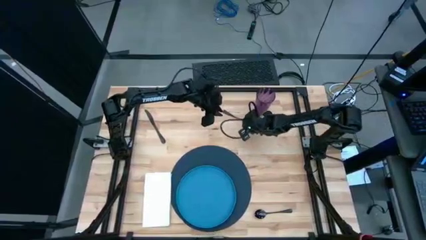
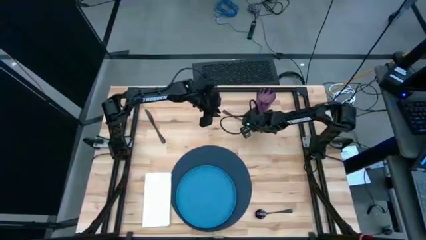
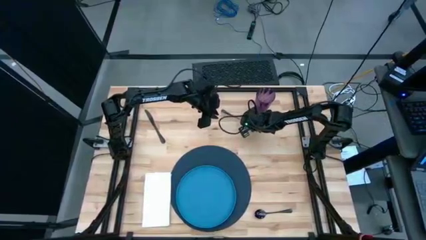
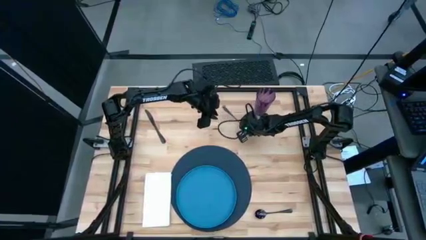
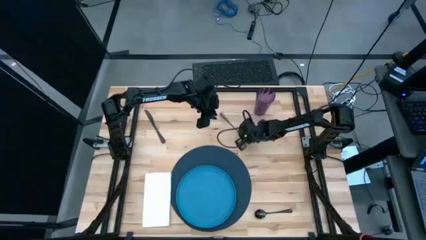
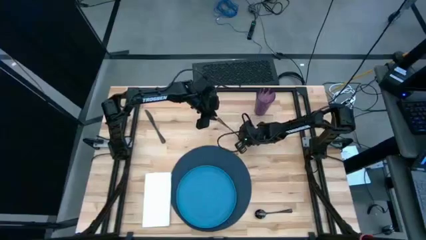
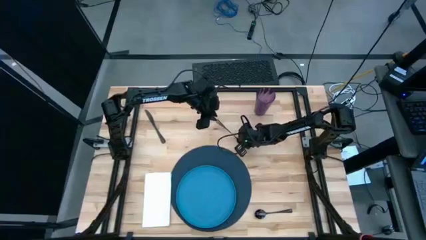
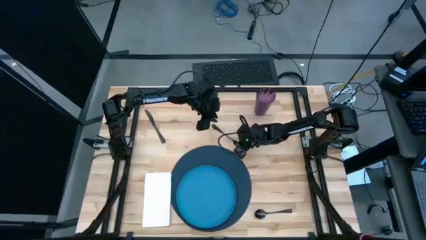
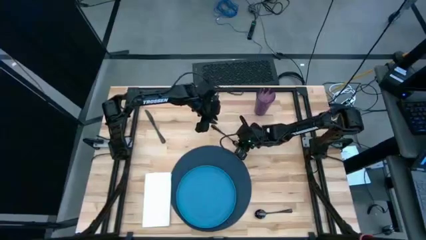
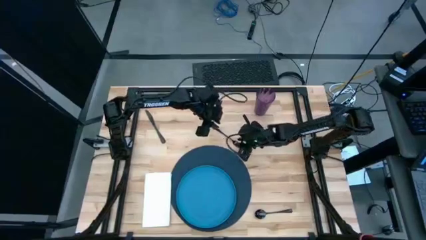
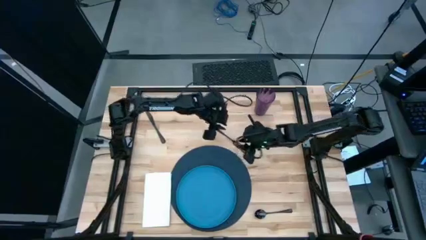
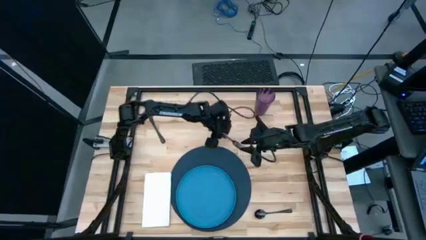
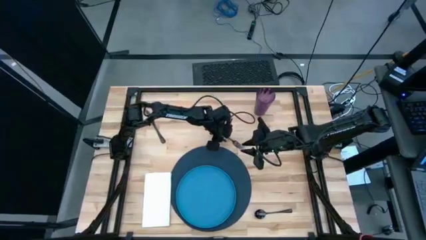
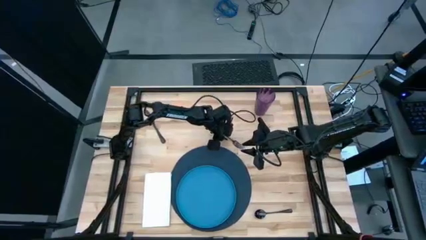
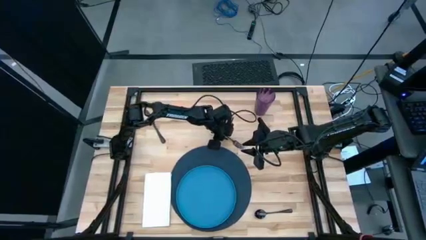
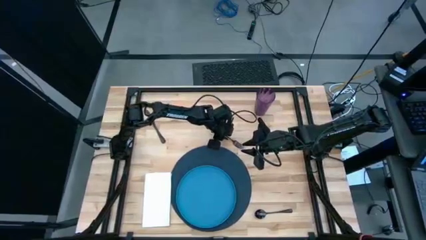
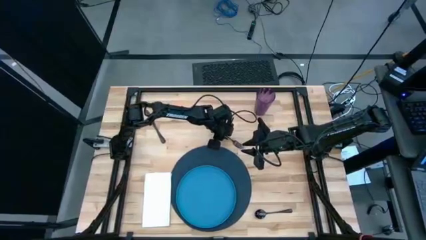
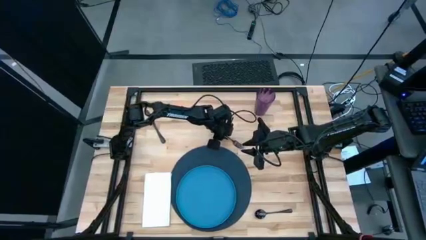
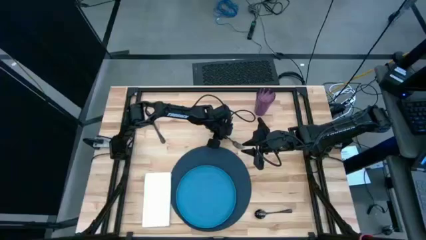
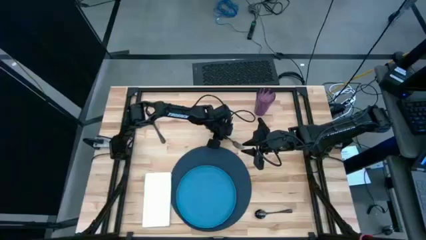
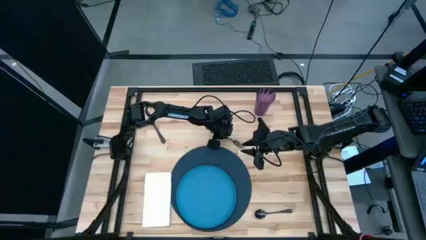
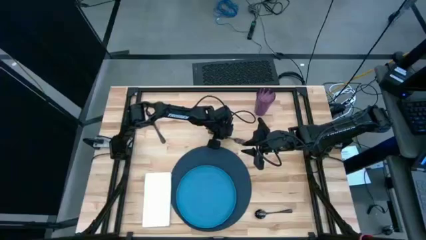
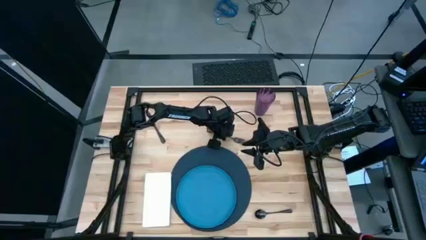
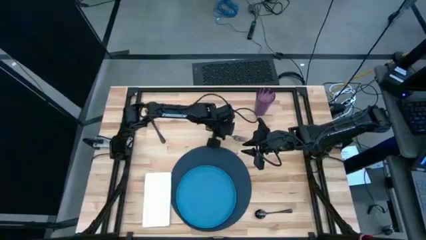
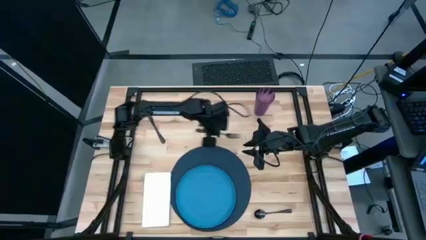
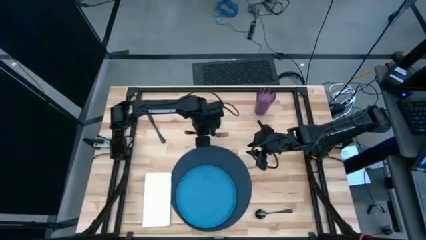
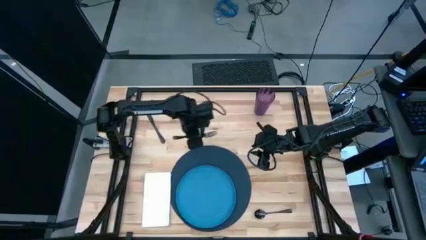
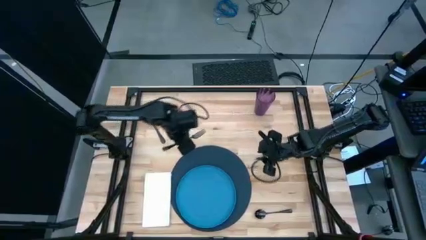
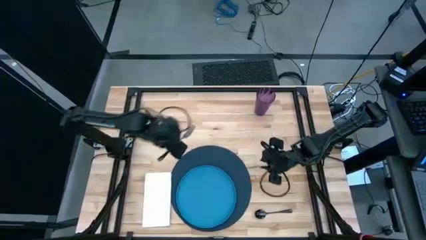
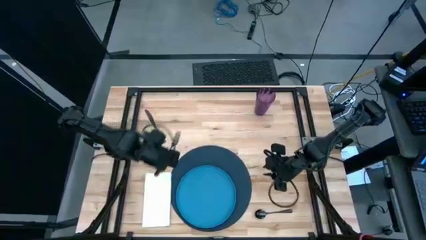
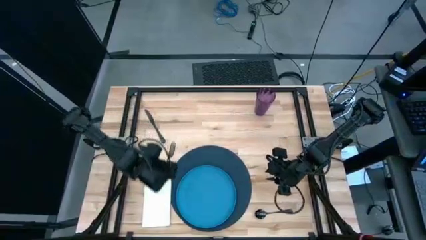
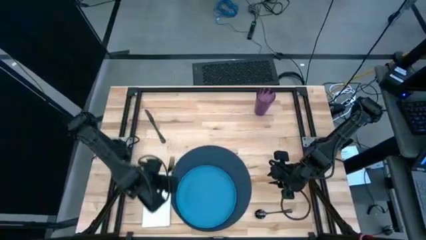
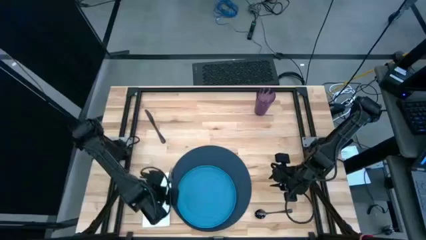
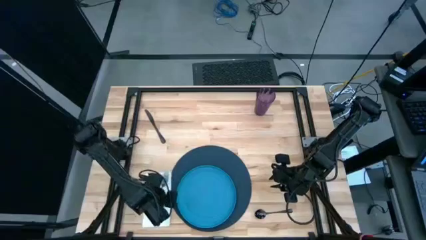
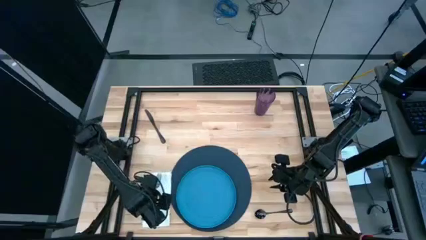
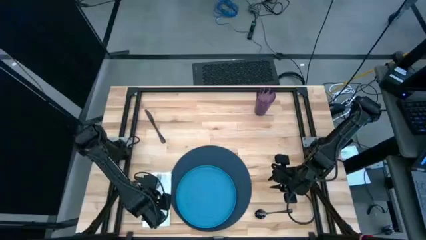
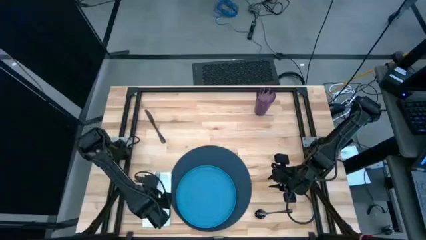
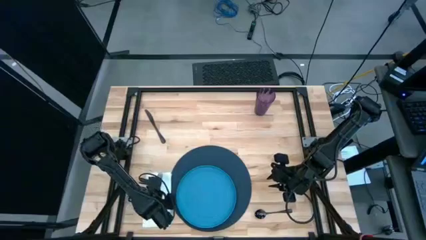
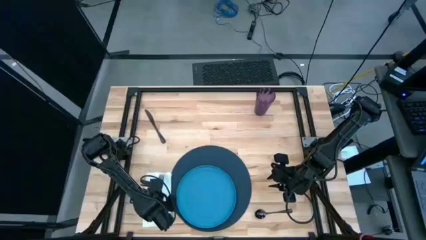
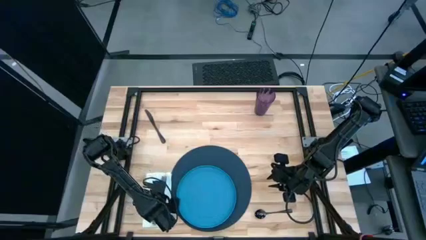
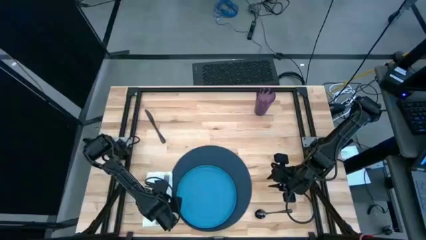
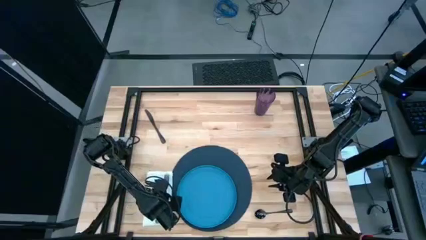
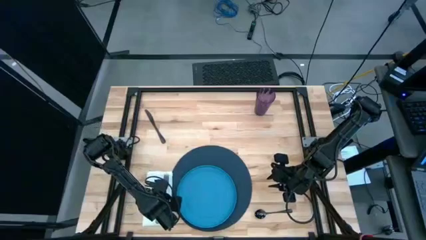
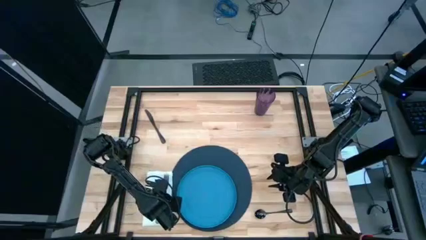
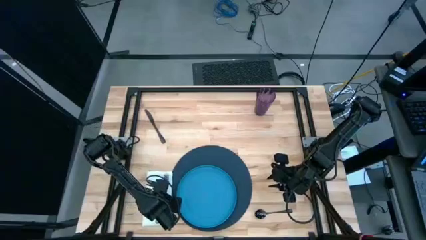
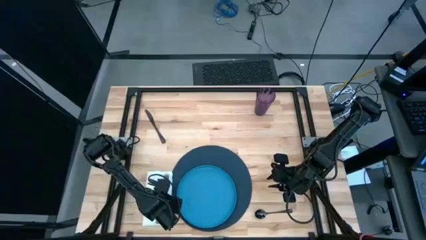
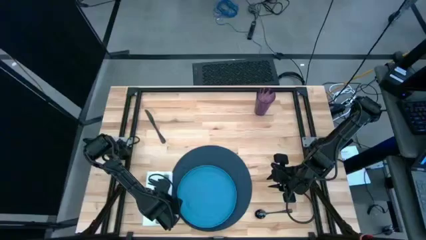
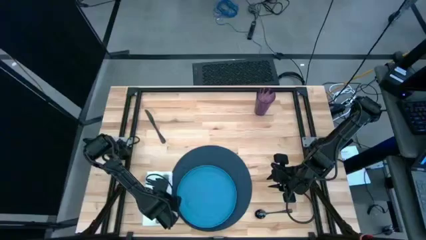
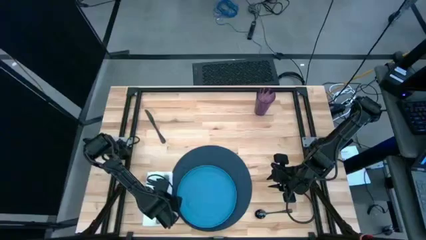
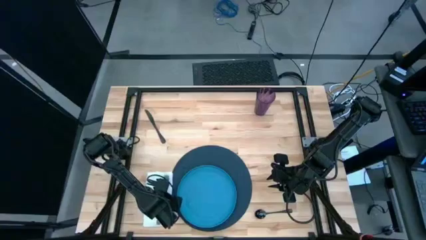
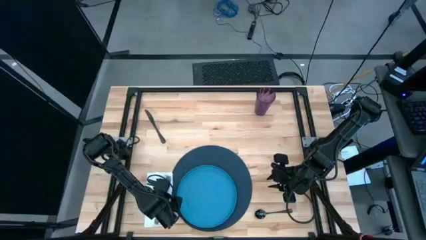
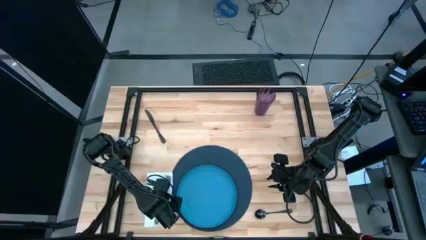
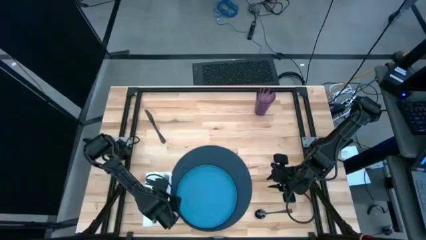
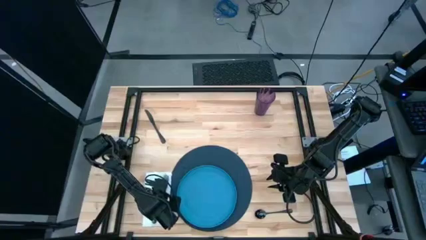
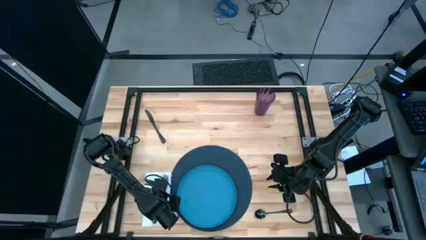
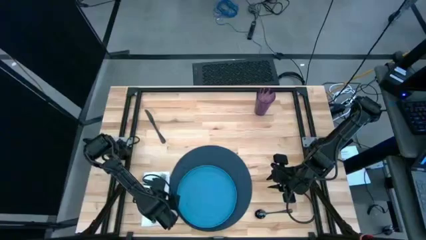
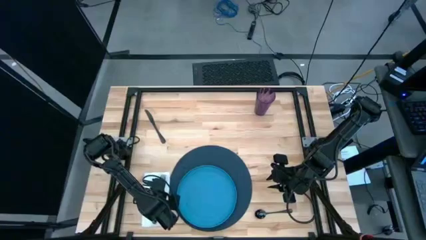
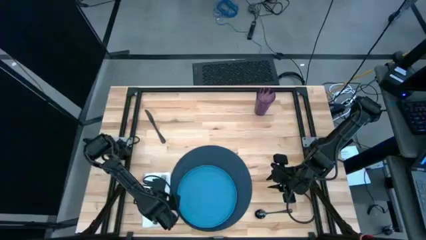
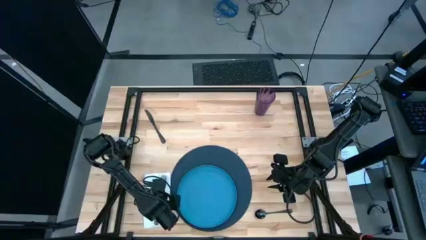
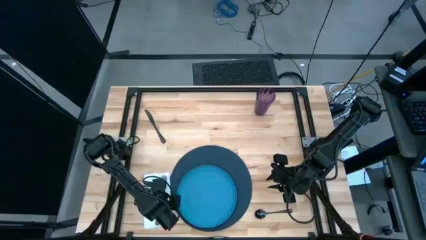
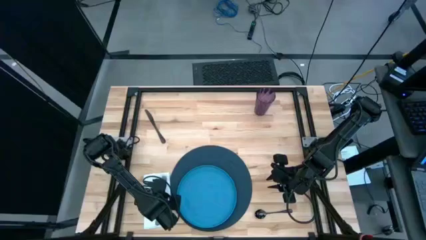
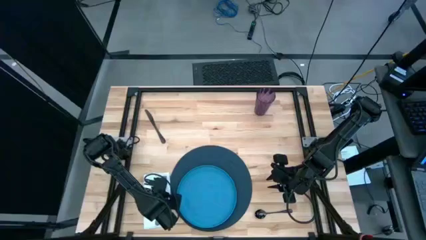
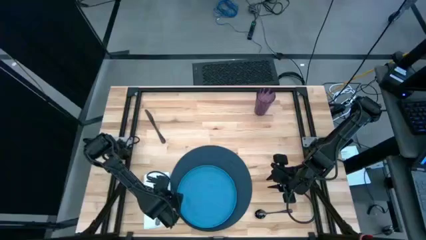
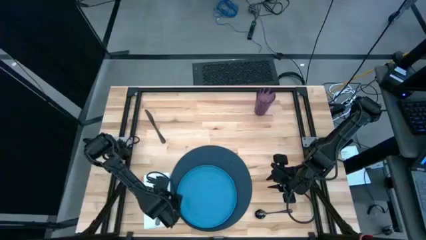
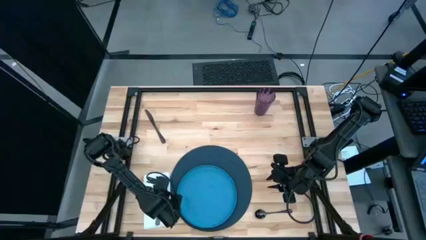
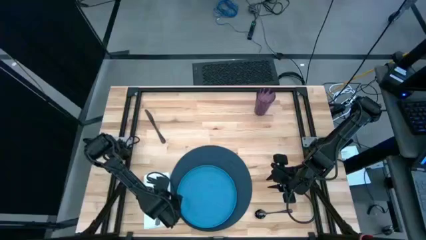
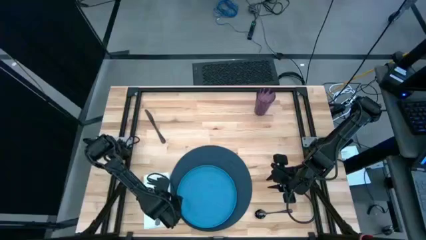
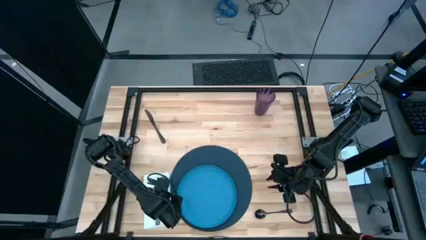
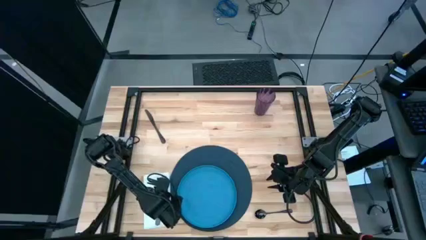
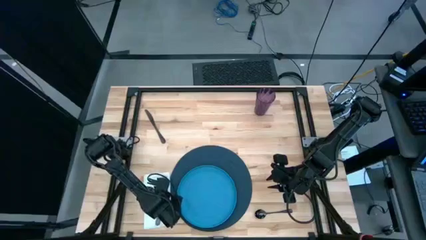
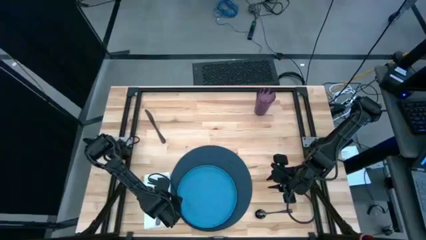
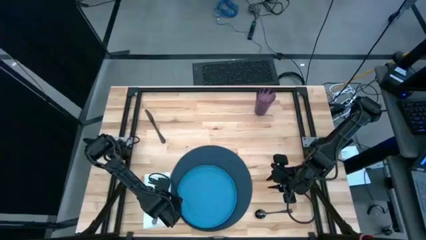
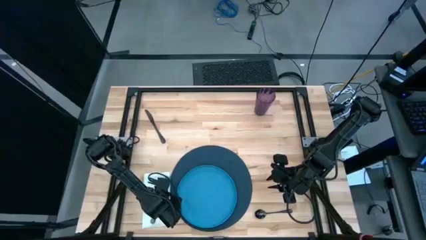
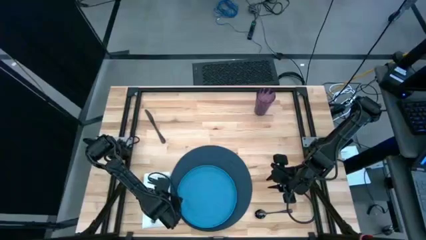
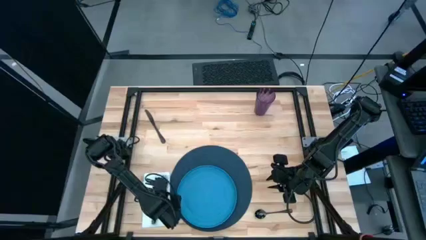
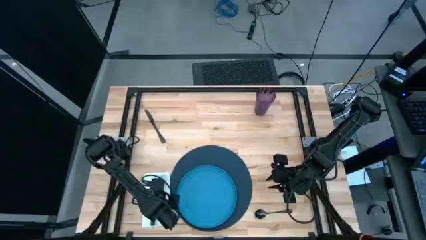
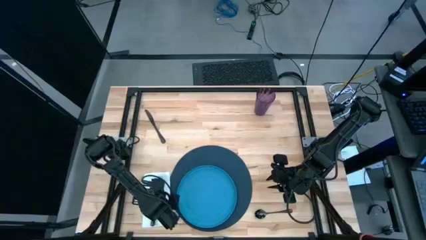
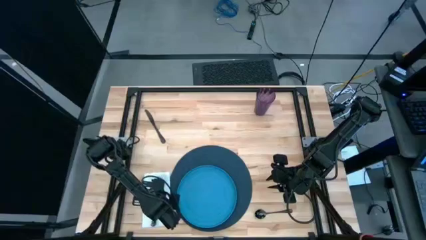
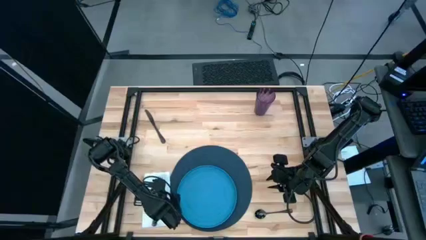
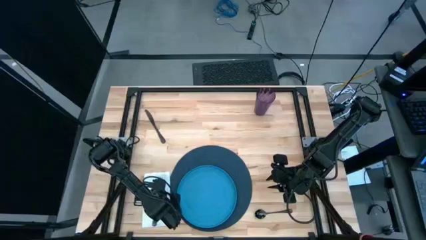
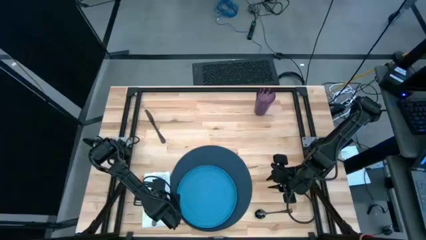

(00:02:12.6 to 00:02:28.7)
Task: Set table place
Put the black fork on the white napkin
